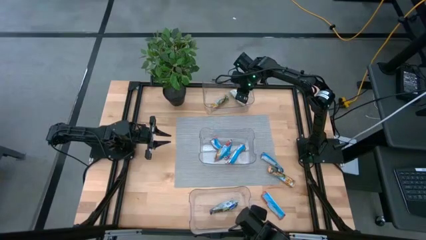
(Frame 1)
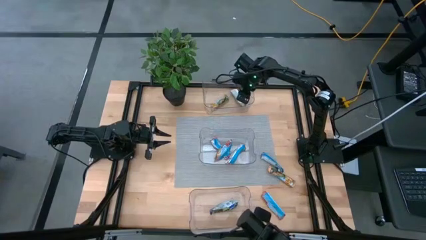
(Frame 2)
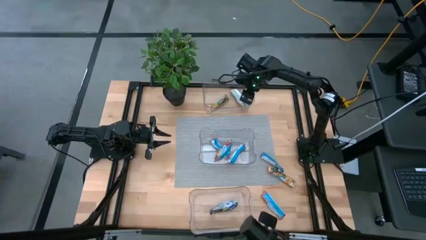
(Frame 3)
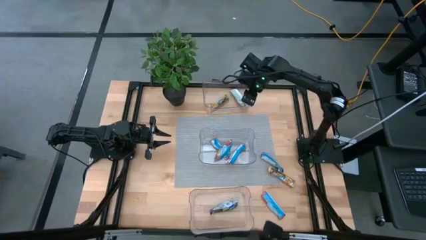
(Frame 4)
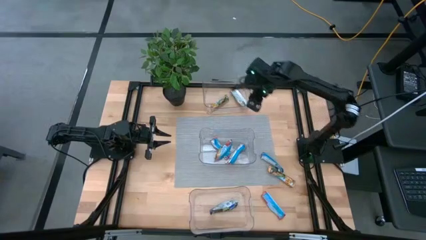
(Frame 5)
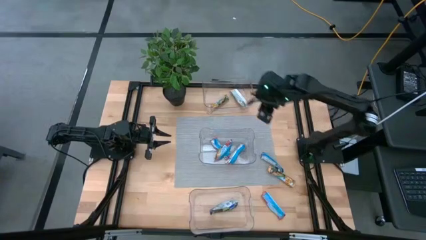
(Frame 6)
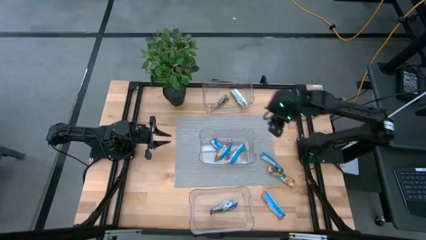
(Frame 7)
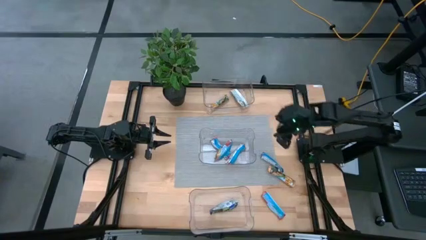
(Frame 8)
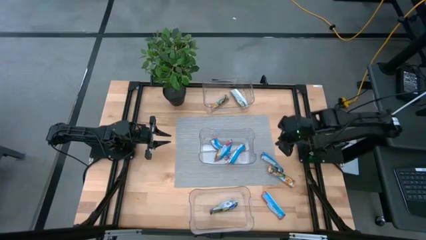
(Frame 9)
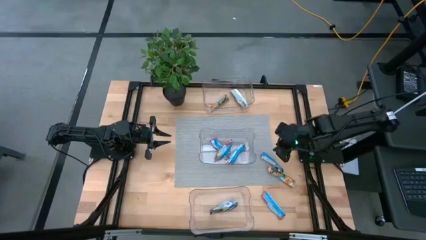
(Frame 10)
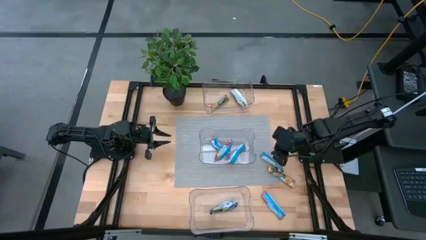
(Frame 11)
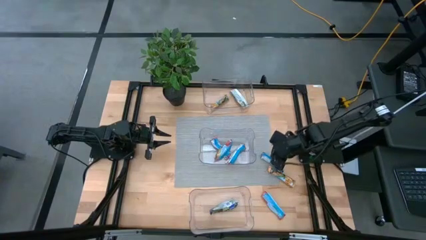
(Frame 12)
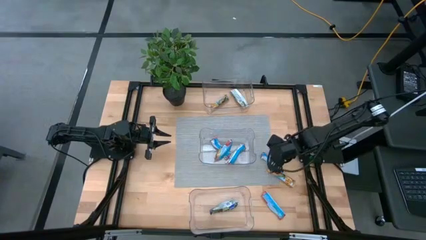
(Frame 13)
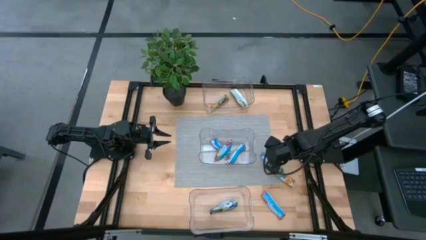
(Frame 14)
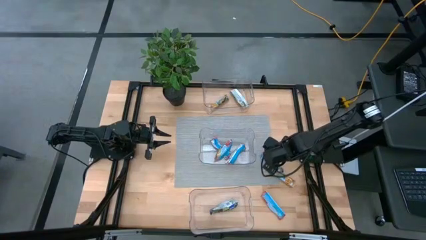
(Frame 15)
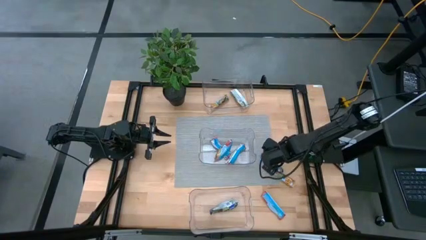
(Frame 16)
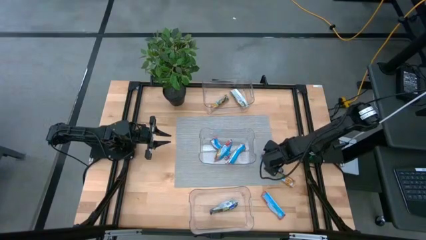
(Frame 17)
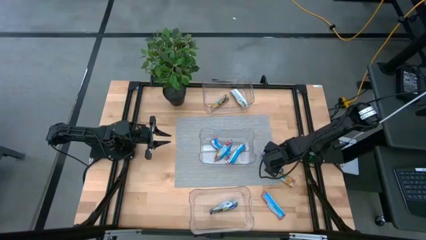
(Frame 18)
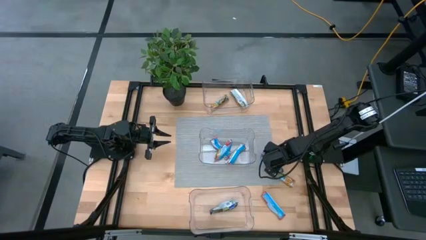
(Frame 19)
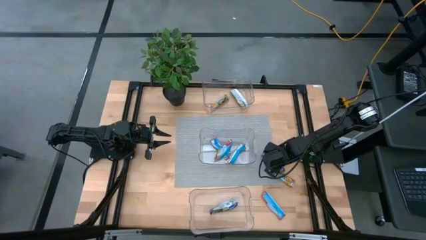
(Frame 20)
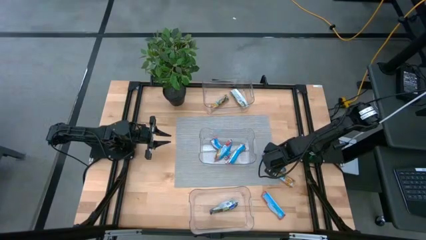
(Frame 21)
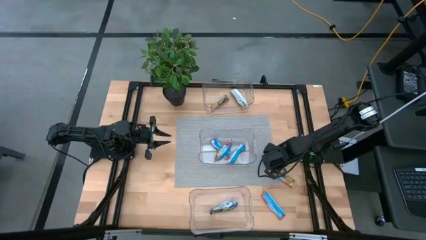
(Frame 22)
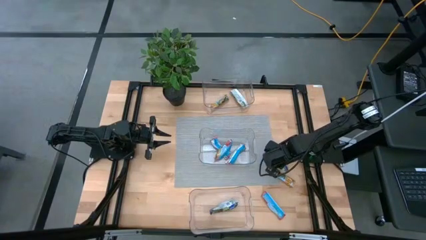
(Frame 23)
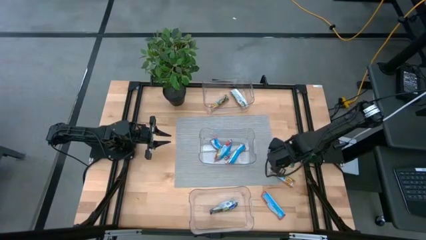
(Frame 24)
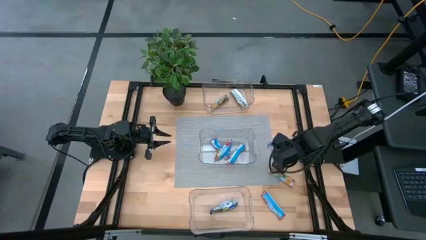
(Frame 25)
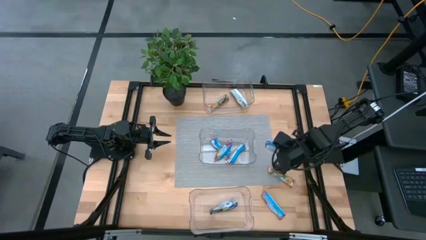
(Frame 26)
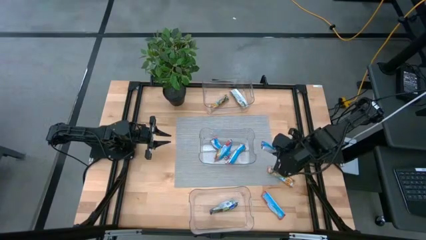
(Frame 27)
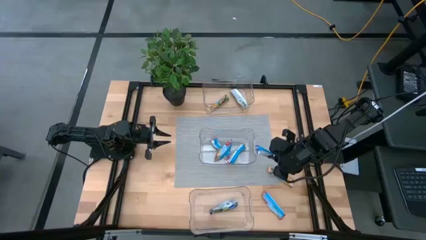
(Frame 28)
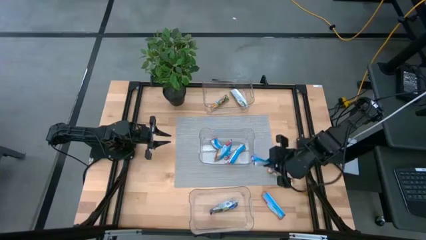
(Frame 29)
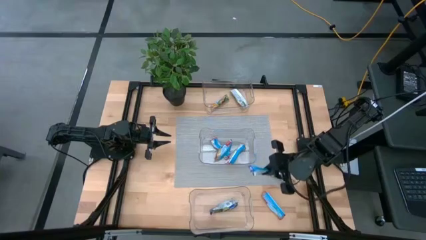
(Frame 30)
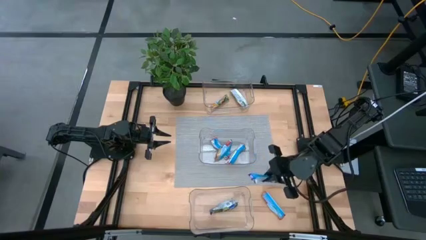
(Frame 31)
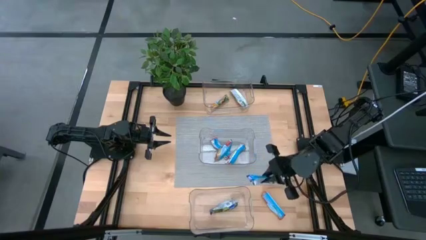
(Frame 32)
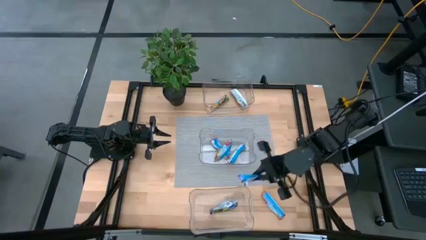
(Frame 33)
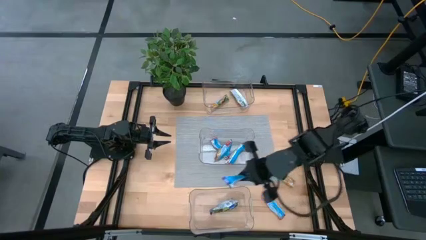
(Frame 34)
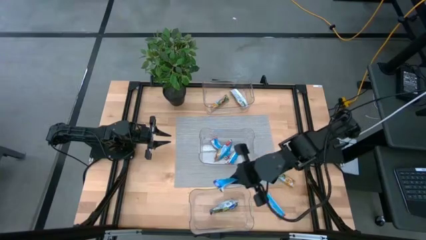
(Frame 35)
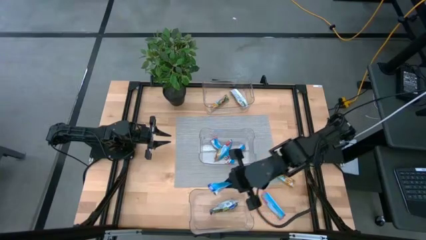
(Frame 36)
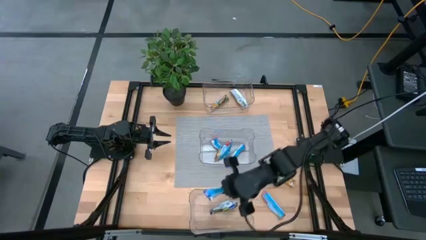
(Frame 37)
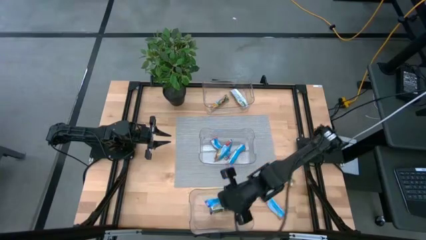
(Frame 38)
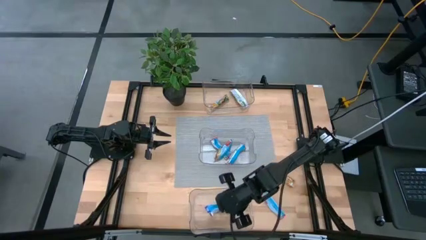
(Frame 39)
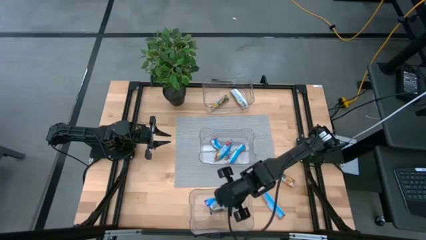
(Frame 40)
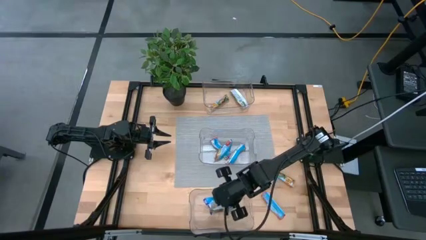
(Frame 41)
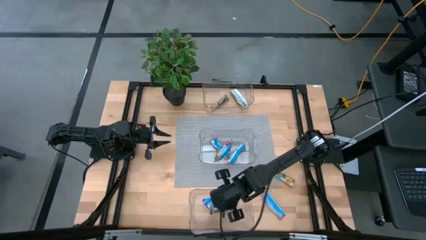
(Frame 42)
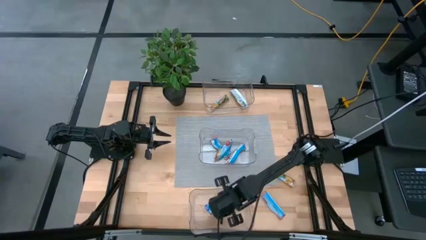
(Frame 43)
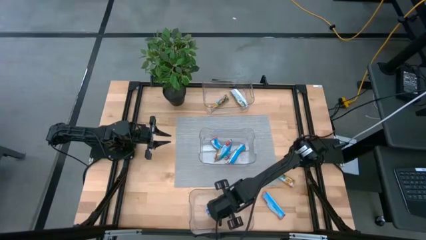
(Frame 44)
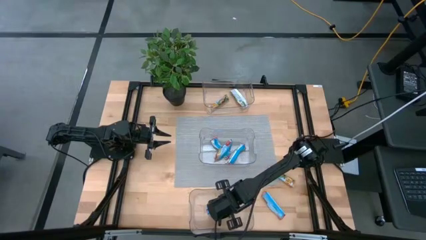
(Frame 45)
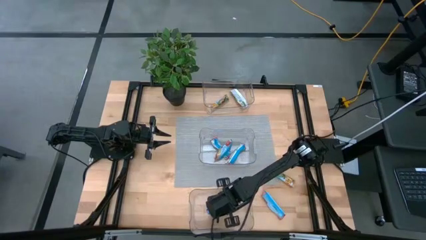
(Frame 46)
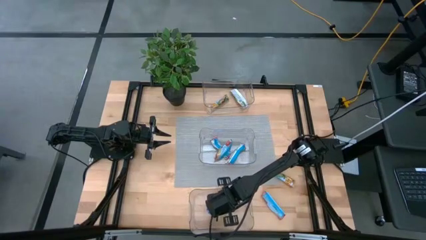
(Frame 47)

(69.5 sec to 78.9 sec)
Task: Pick and place Granola Bars by type
Put the blue granola bar into the bottom transparent bin

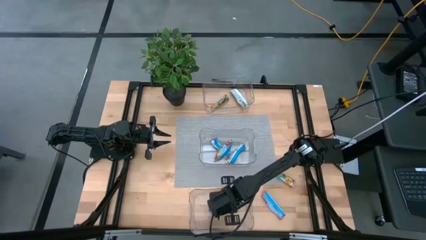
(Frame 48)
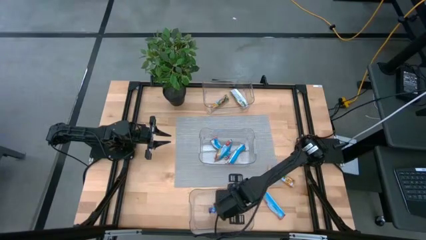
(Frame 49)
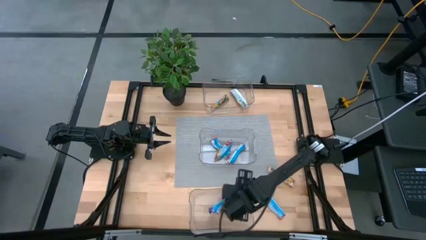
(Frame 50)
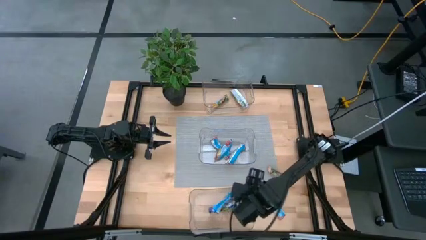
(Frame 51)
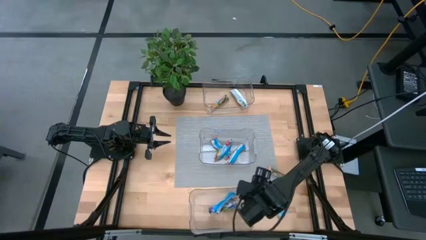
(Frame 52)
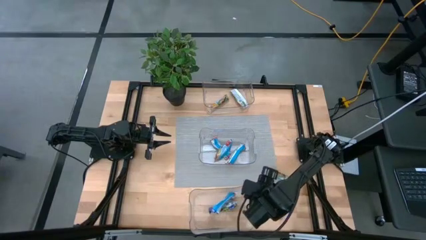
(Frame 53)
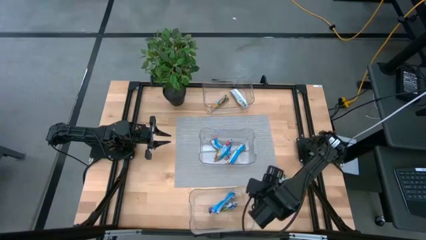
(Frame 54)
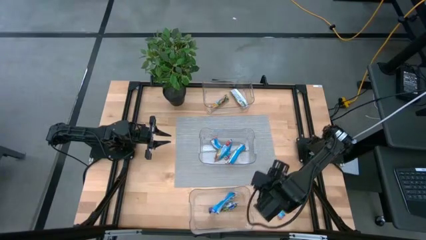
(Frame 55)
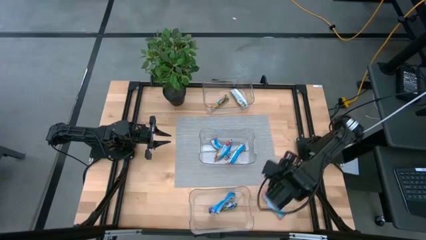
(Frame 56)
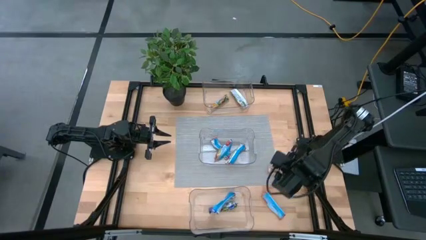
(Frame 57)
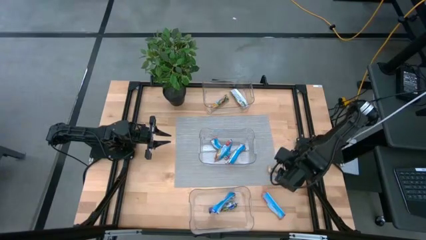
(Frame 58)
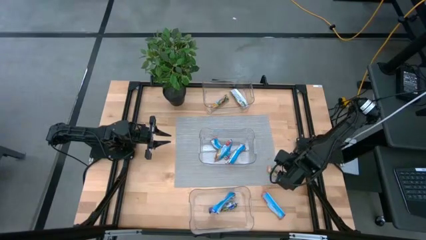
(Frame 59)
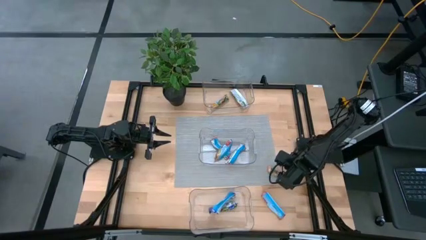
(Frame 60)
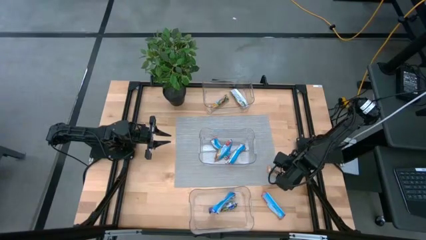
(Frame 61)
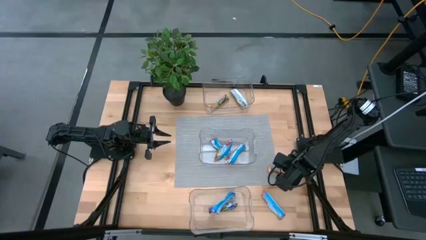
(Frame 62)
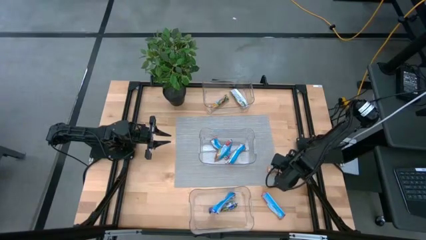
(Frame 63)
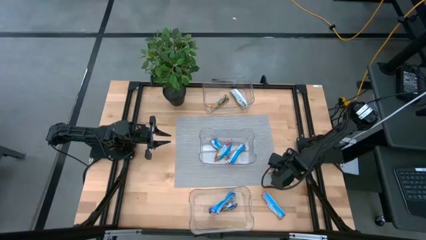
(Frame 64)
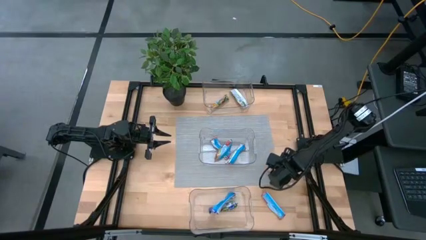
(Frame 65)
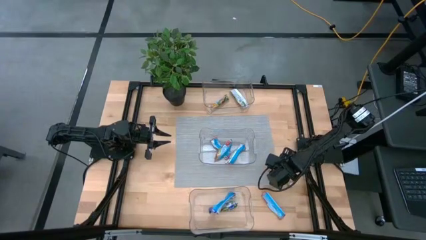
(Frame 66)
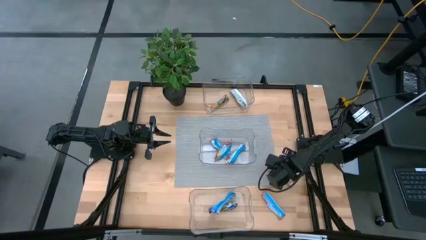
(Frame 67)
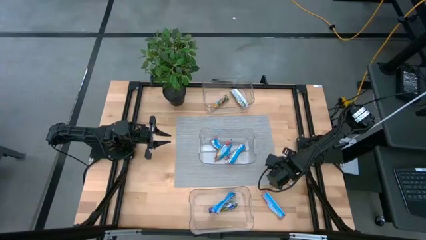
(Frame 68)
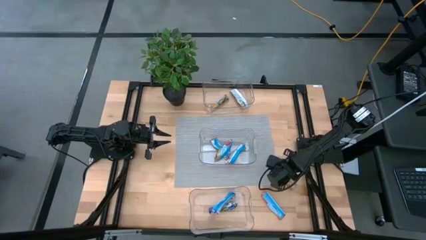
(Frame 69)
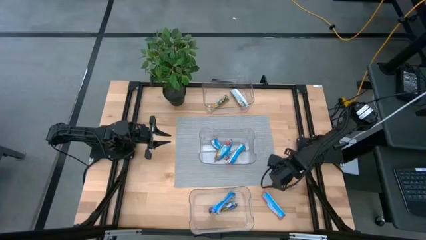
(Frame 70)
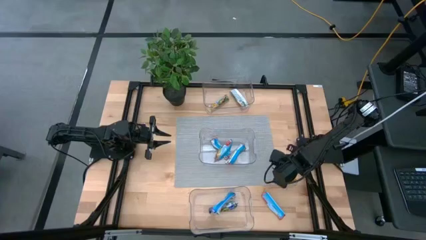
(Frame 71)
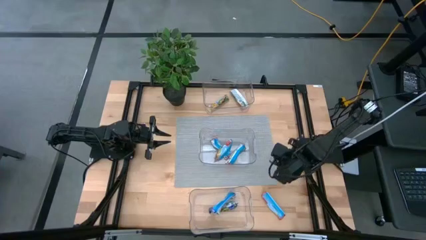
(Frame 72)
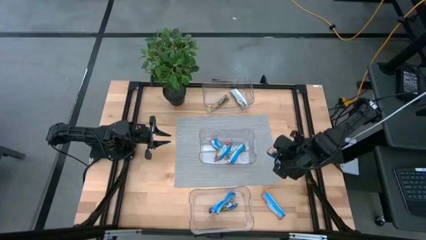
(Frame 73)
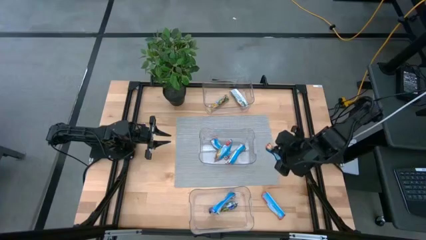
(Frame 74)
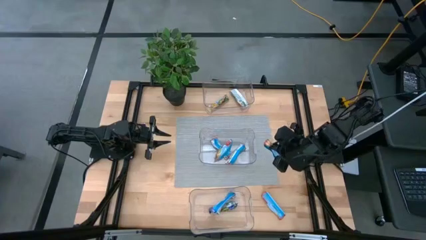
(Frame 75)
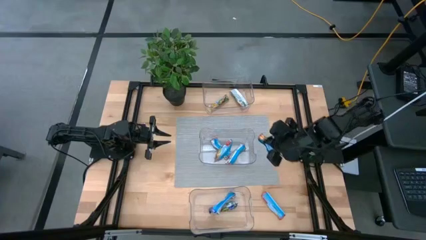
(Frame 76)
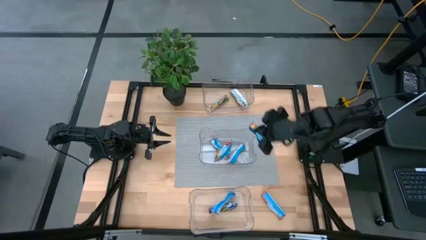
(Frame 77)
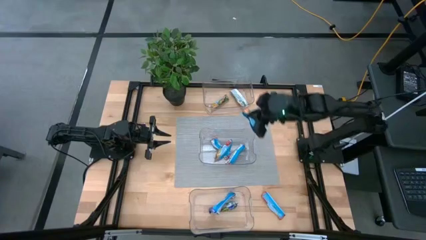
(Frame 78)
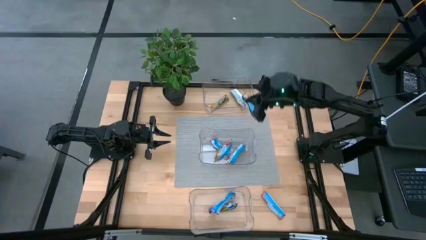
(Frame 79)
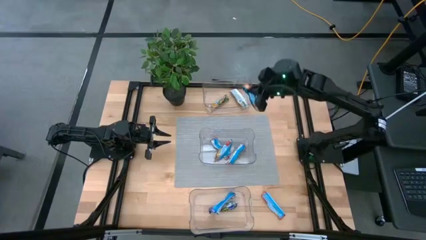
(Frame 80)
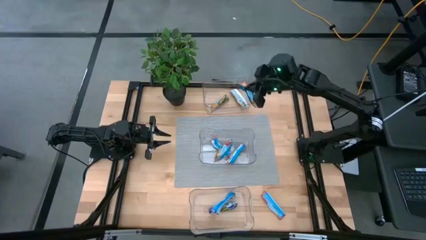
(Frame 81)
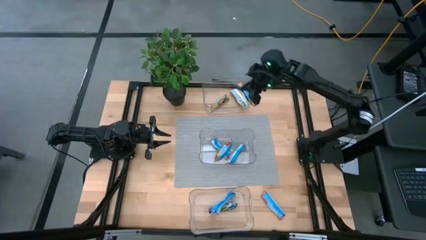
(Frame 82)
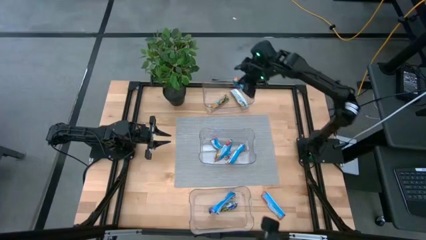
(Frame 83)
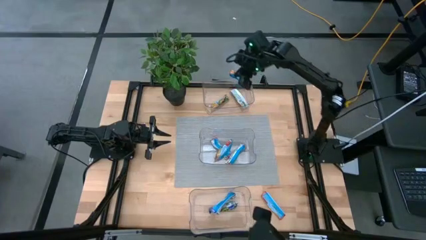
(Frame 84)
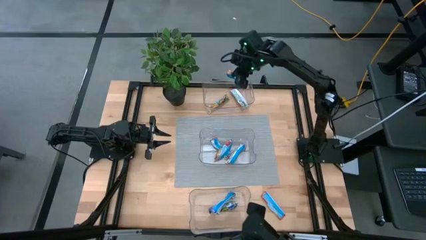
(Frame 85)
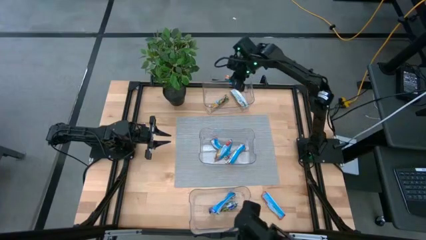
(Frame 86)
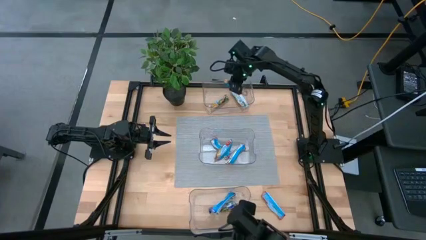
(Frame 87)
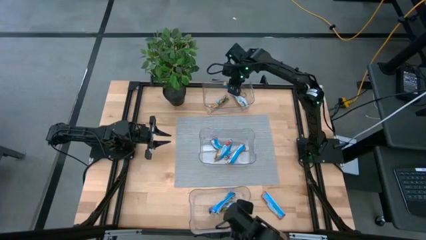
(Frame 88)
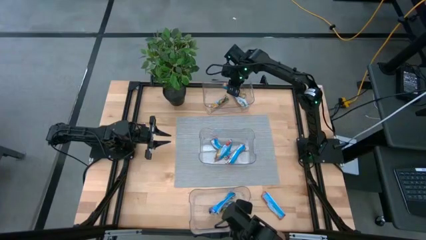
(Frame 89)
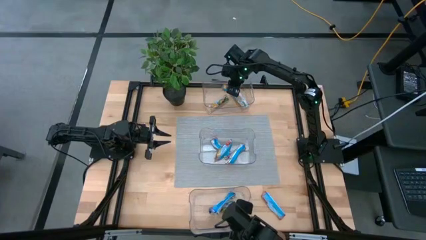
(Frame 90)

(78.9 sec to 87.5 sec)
Put the orange granola bar into the top transparent bin
